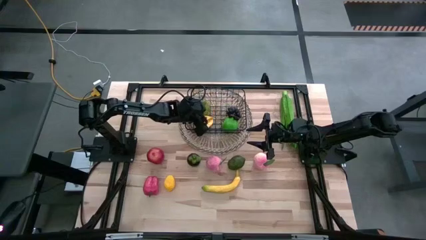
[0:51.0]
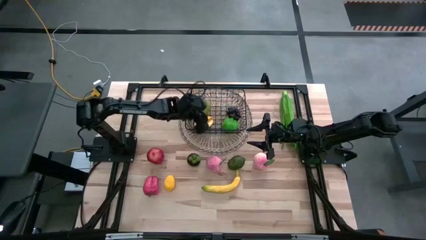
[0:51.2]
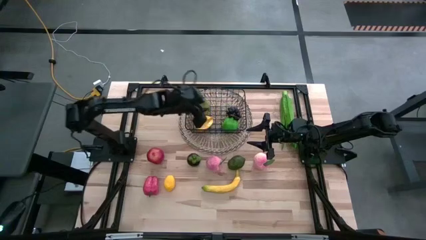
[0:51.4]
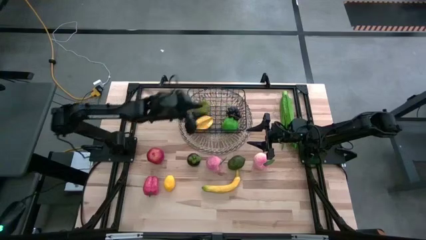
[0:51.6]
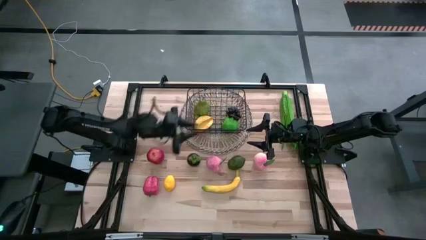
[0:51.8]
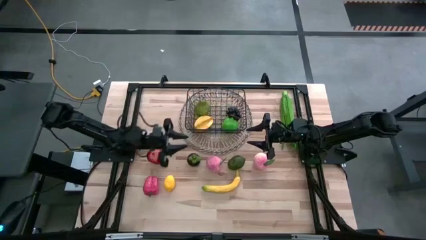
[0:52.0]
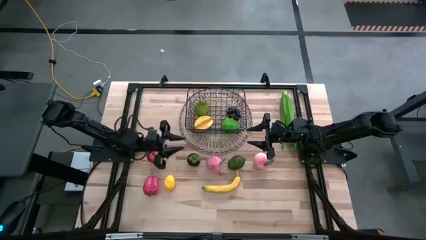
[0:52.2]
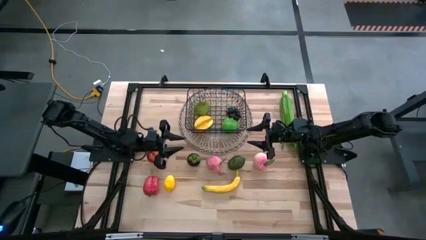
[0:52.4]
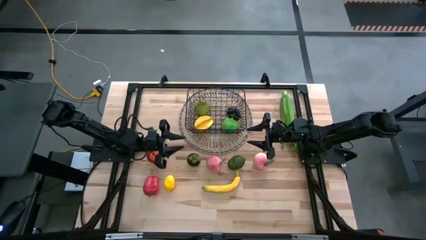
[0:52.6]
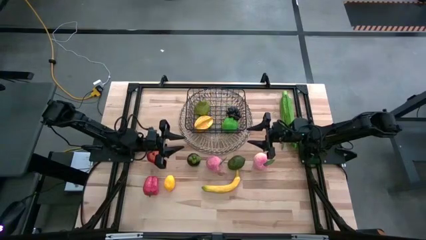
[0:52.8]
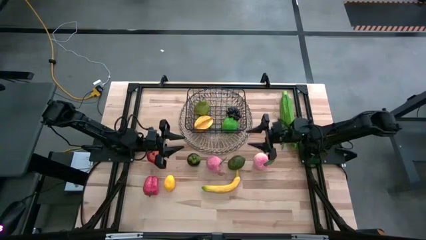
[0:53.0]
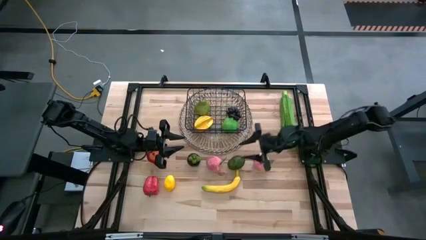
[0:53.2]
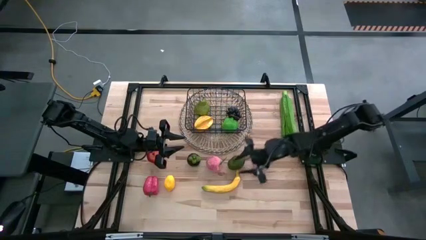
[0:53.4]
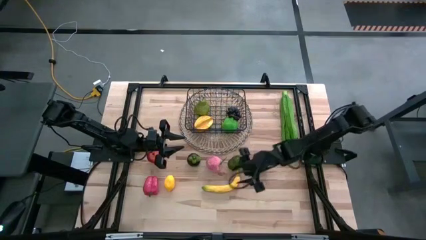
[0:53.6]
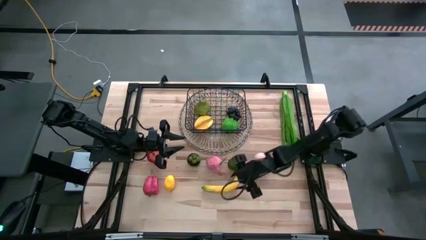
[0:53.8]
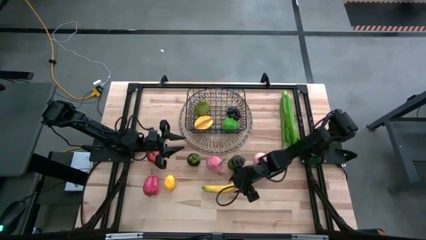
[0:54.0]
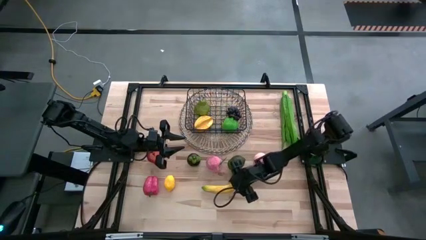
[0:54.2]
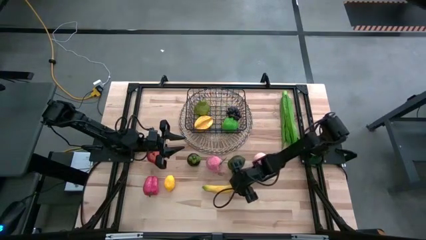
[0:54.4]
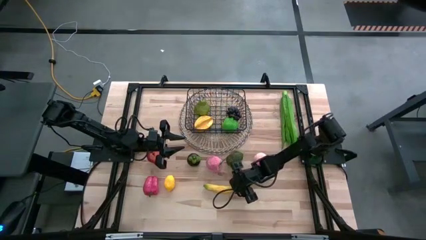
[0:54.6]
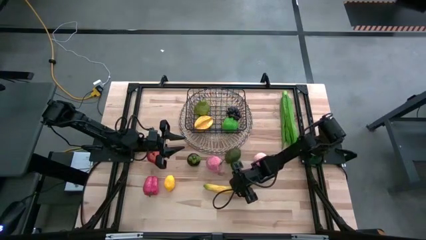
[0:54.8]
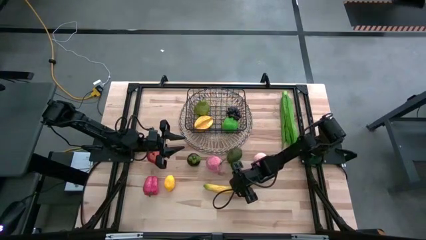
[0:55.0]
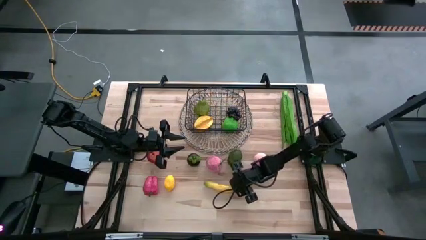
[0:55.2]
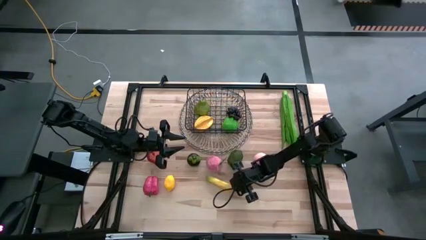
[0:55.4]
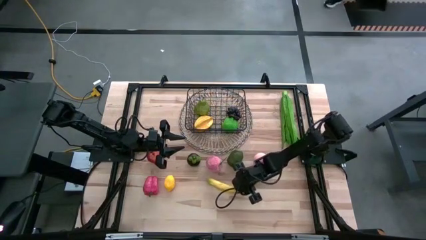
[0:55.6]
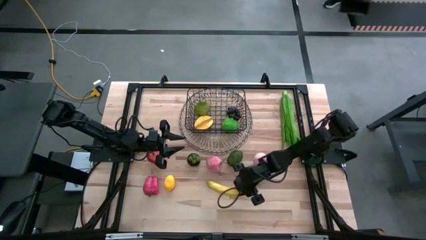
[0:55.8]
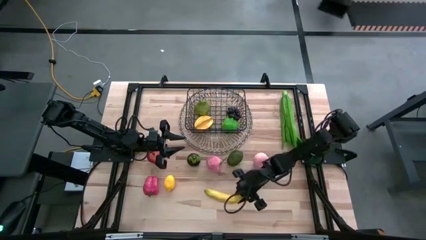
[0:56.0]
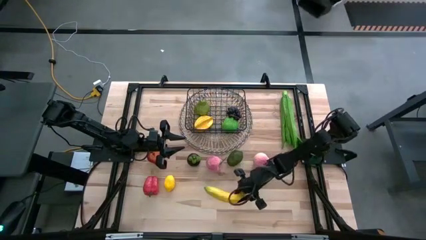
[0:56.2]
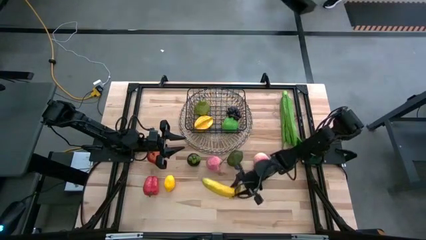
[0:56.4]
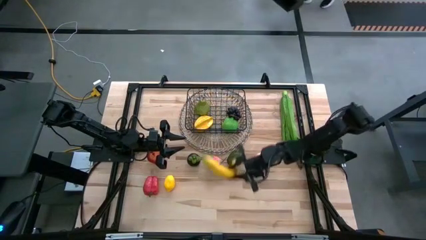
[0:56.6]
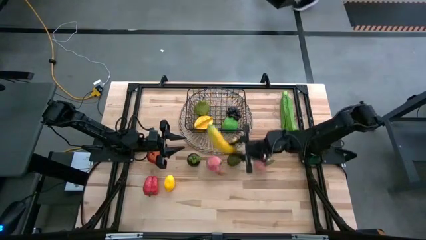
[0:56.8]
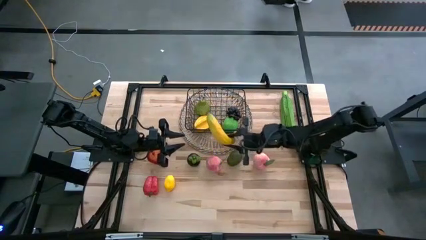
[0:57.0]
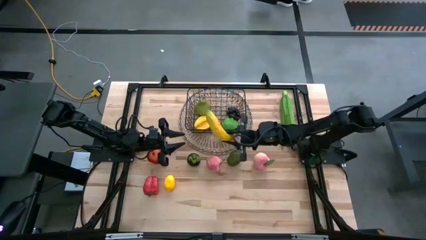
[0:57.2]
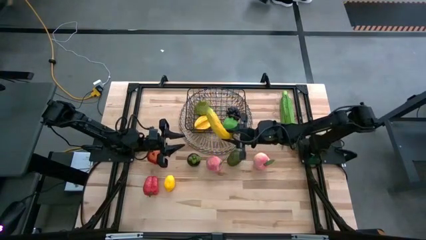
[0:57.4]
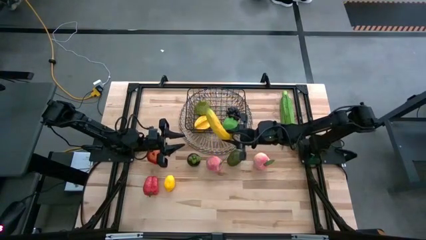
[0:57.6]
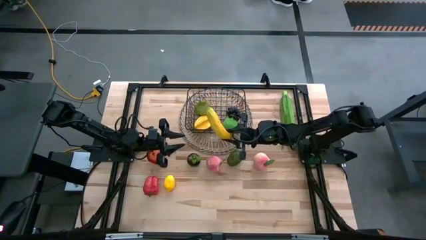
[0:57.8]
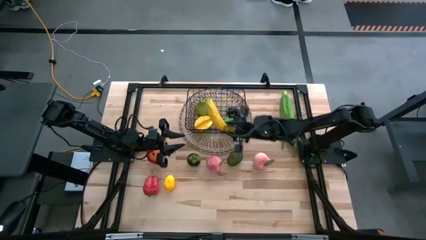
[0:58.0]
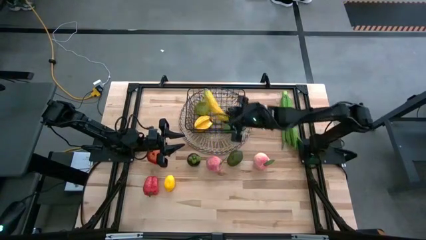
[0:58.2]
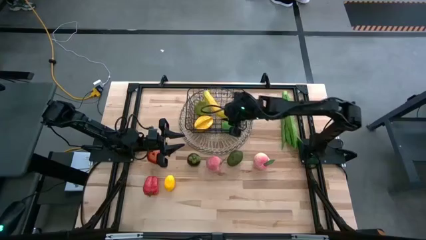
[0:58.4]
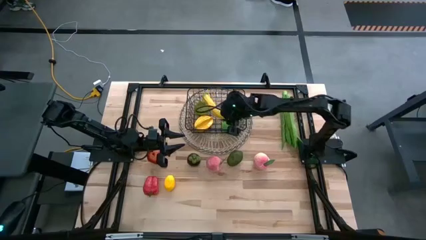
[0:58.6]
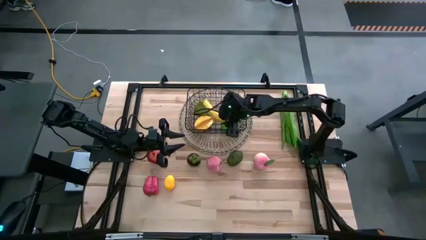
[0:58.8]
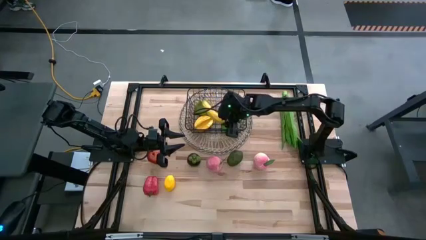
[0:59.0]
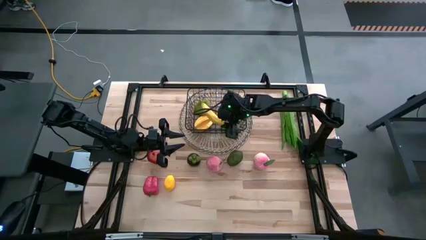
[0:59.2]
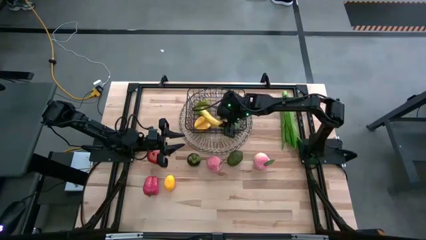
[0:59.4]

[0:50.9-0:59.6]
Task: Build produce basket
Put the banana into the black wire basket

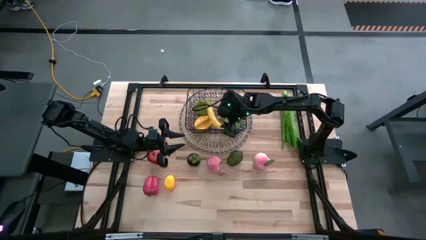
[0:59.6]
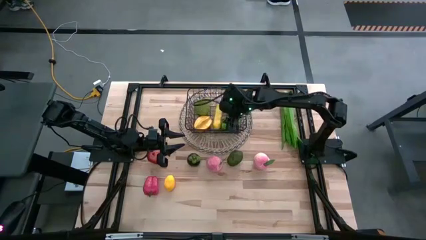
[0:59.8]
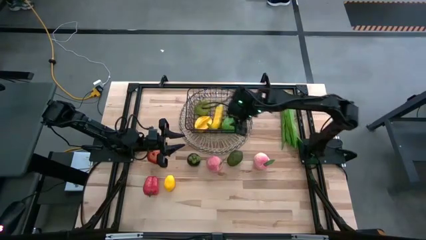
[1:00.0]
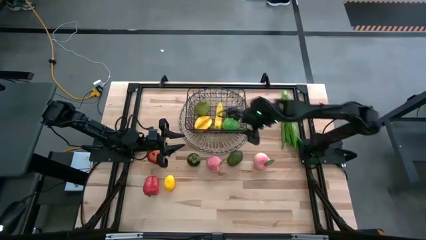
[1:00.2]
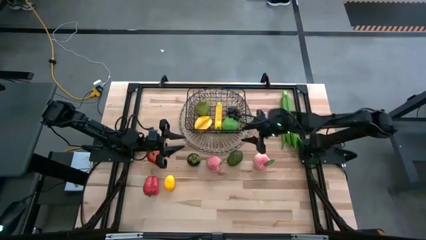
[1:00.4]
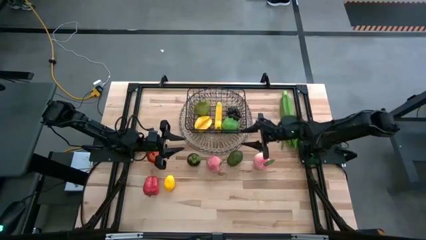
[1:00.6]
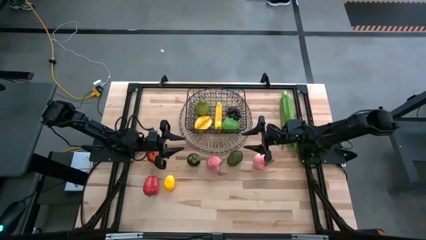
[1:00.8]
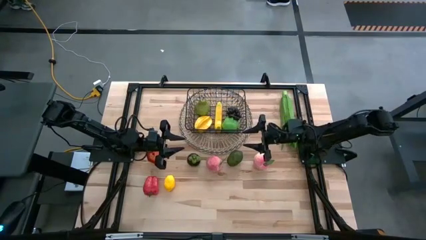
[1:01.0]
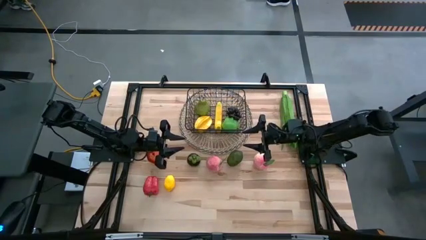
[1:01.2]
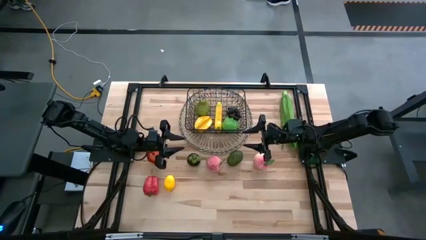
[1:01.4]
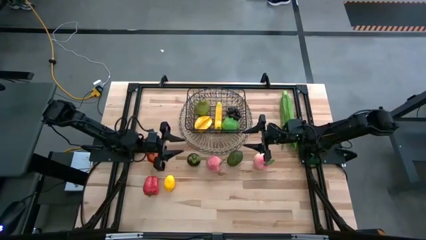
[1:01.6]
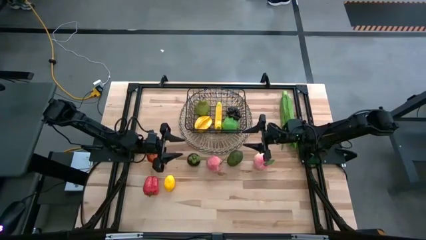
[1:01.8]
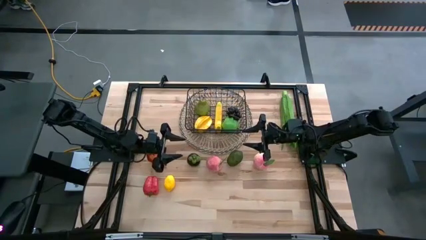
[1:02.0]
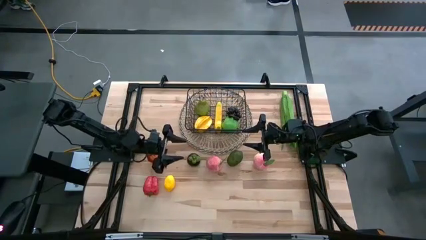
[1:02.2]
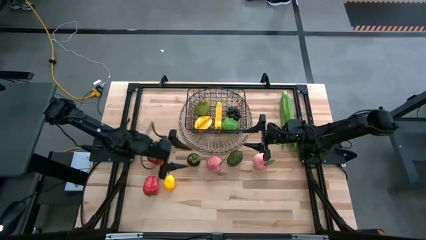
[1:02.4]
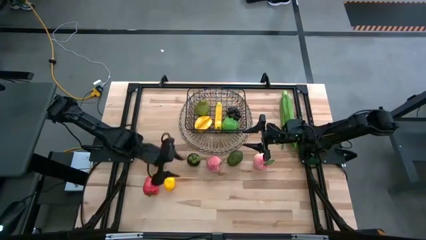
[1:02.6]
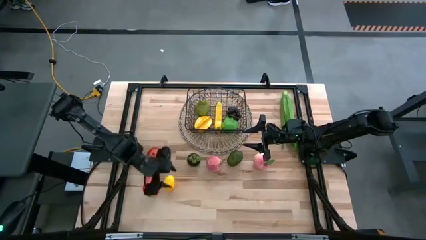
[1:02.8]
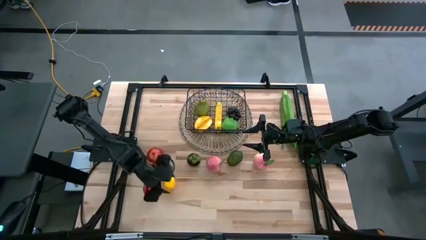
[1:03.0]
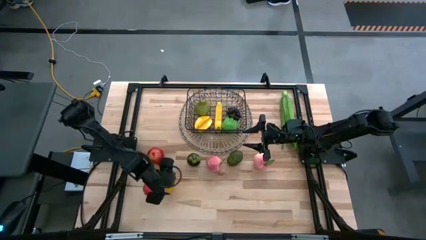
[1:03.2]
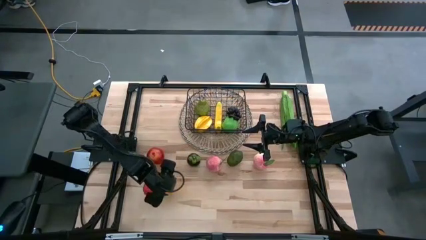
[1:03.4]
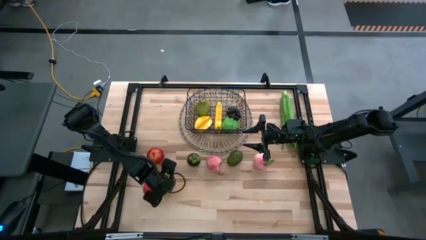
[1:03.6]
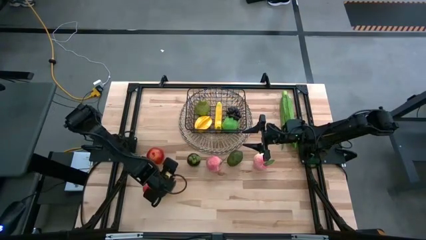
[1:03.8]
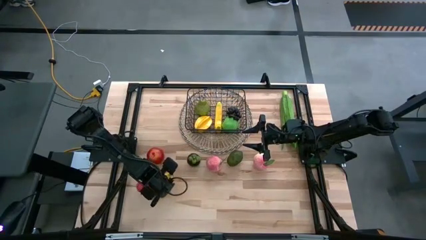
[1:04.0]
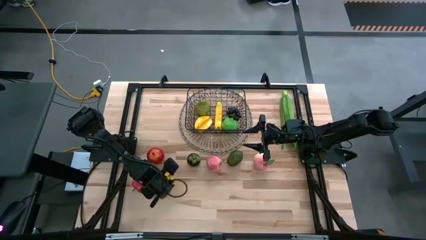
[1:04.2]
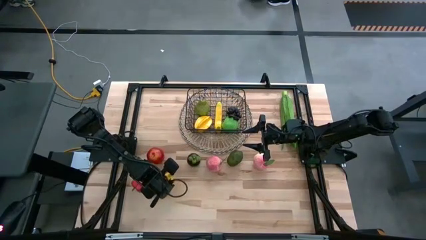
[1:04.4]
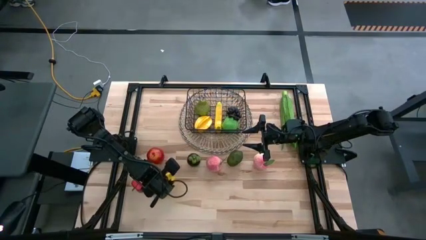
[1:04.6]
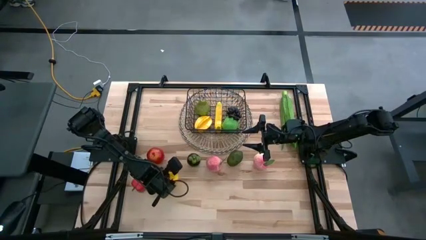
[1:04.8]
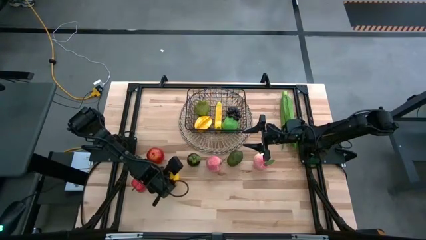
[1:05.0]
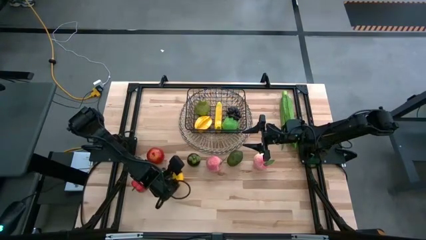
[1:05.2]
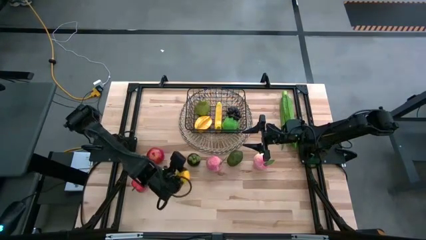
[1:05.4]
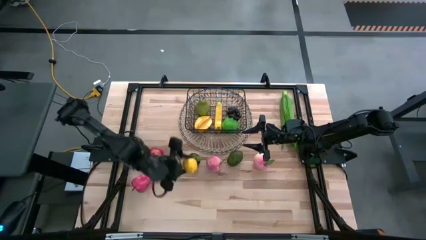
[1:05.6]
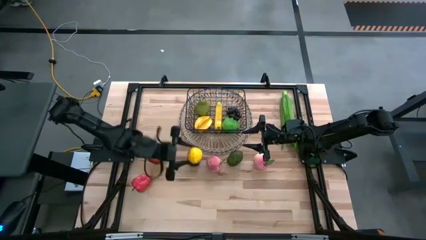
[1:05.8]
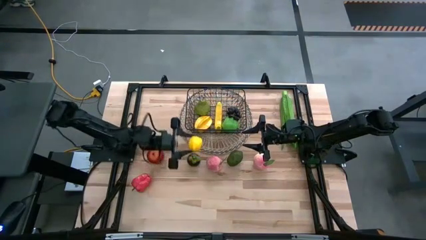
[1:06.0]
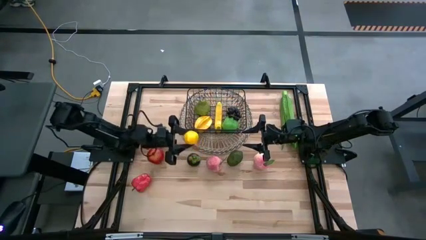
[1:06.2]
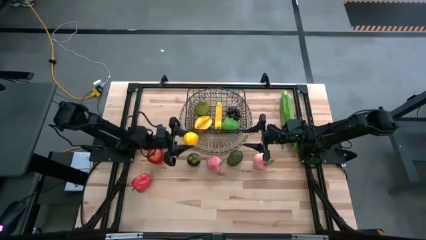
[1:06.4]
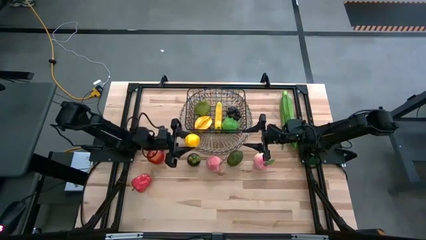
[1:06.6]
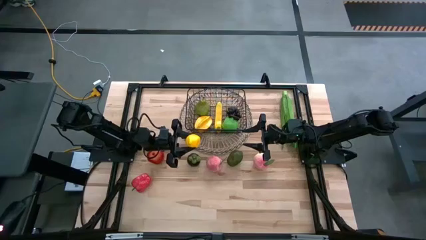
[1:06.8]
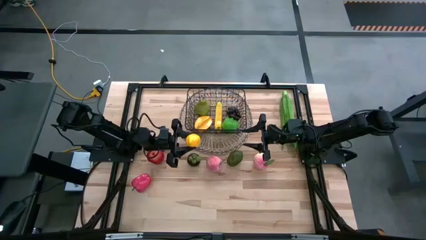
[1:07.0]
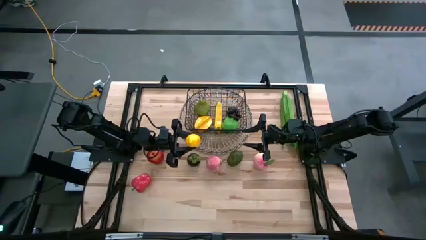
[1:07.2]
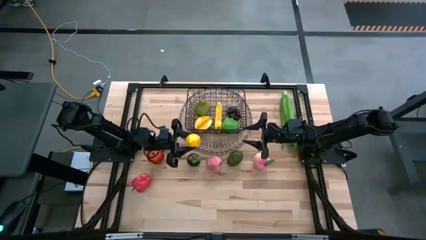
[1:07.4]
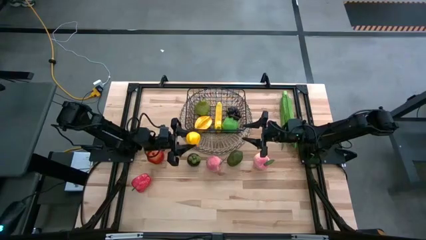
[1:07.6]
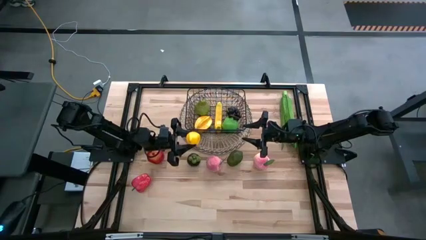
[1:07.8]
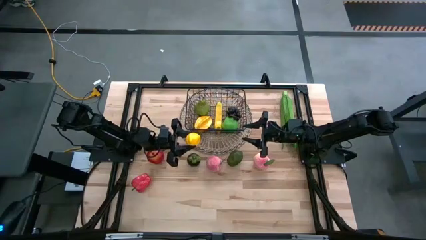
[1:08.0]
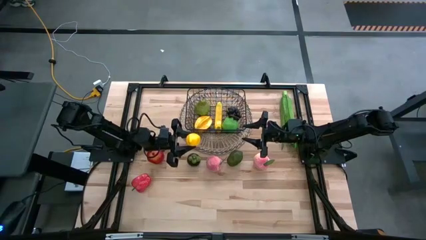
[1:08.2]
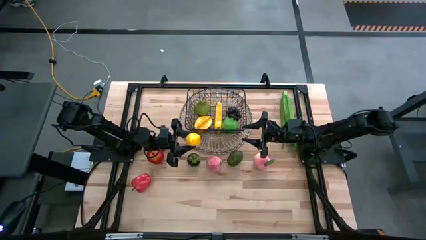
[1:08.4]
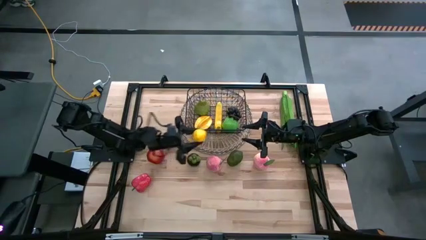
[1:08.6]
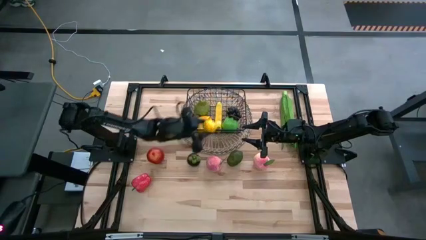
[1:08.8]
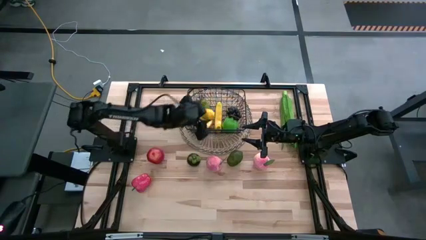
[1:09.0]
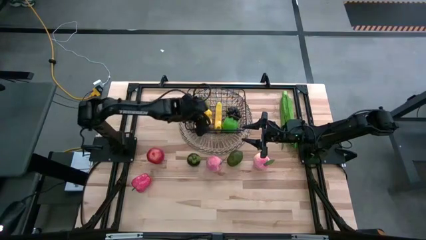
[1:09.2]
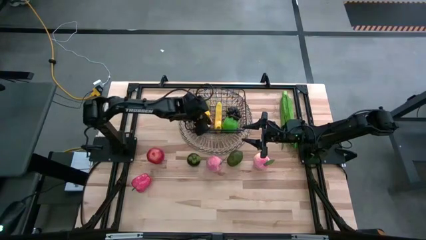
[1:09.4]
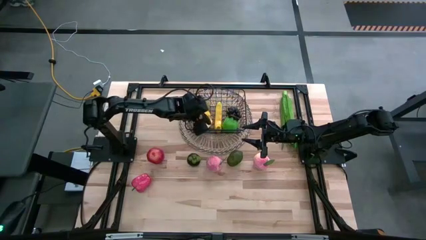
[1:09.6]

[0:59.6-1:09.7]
Put the lemon into the black wire basket
